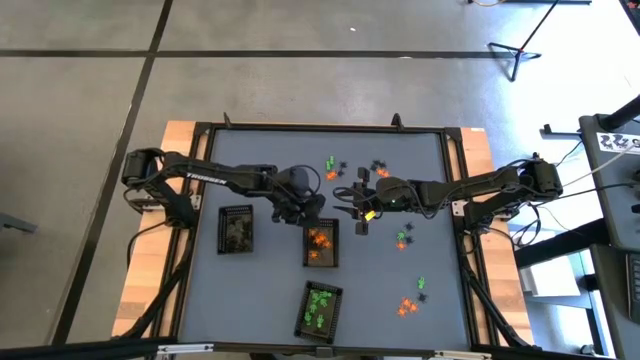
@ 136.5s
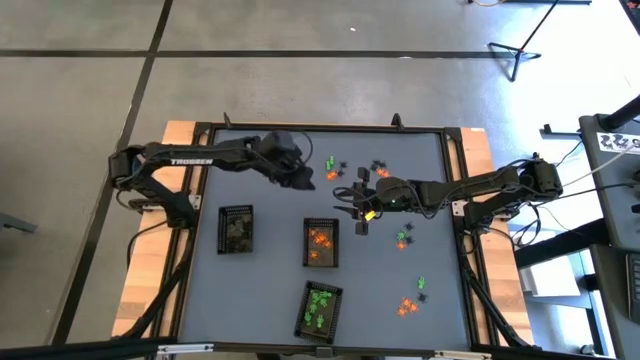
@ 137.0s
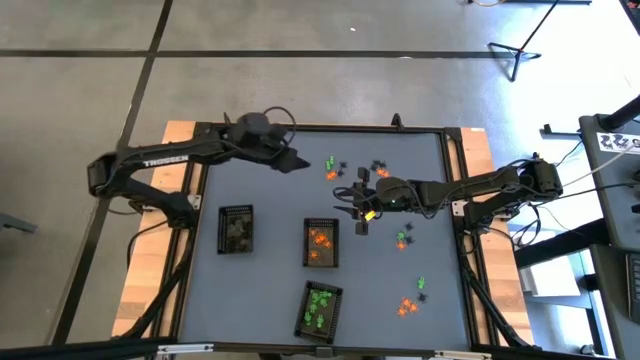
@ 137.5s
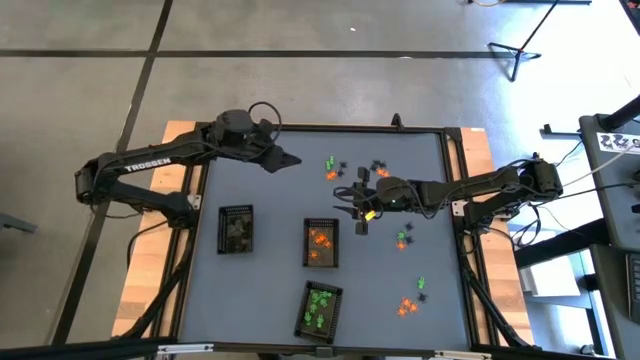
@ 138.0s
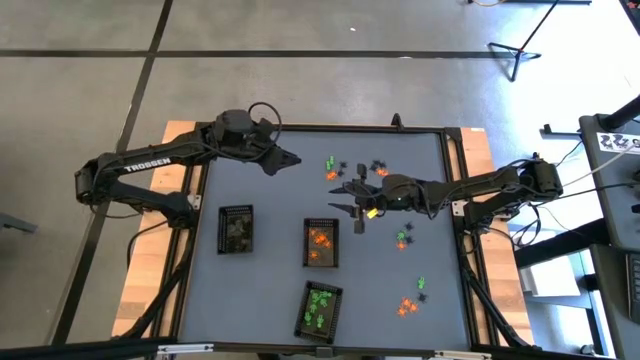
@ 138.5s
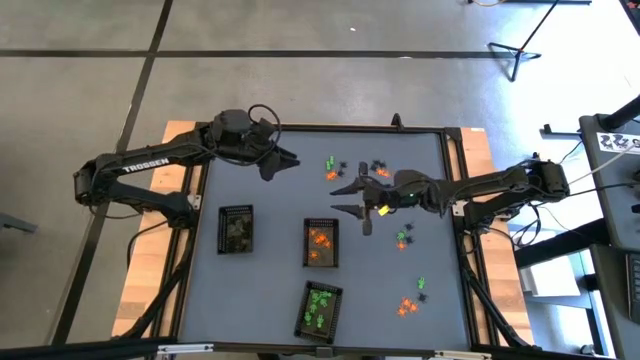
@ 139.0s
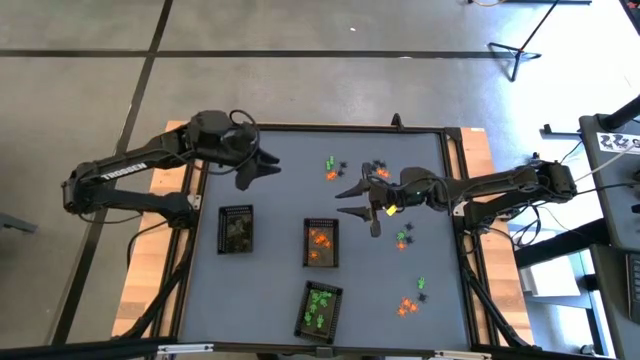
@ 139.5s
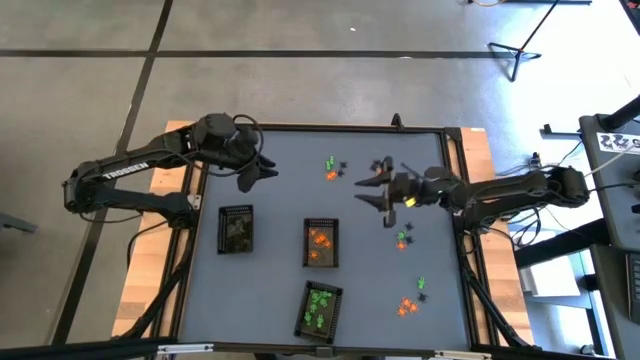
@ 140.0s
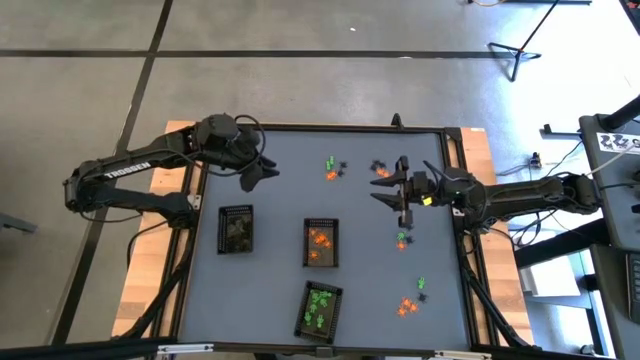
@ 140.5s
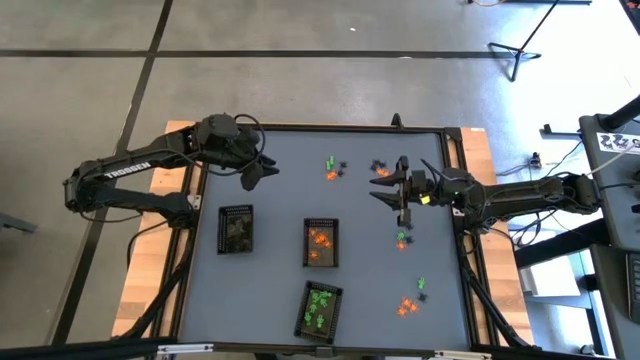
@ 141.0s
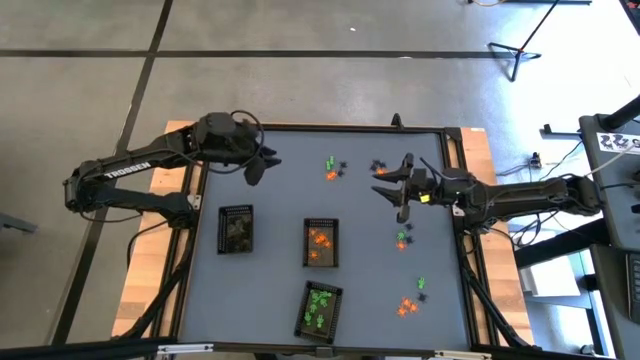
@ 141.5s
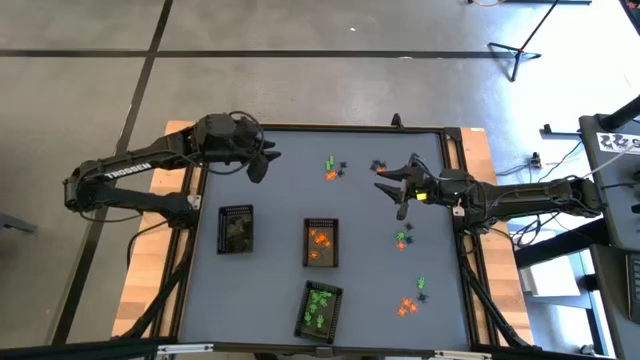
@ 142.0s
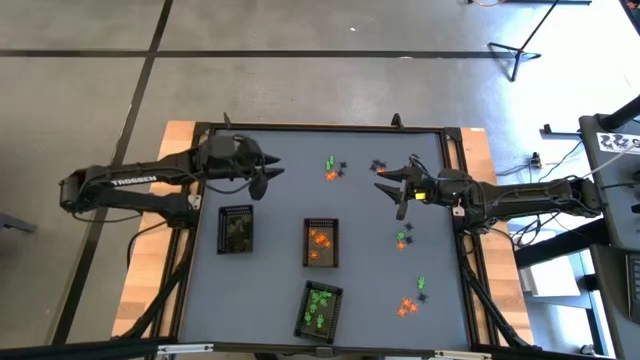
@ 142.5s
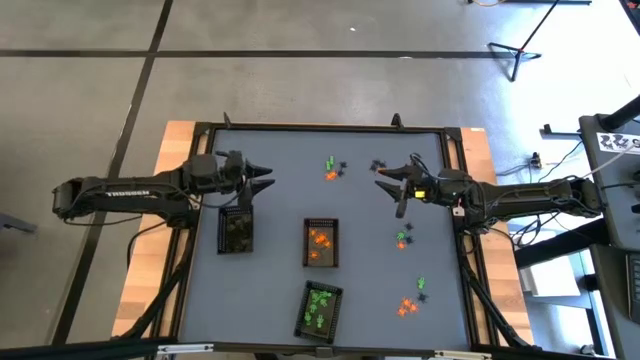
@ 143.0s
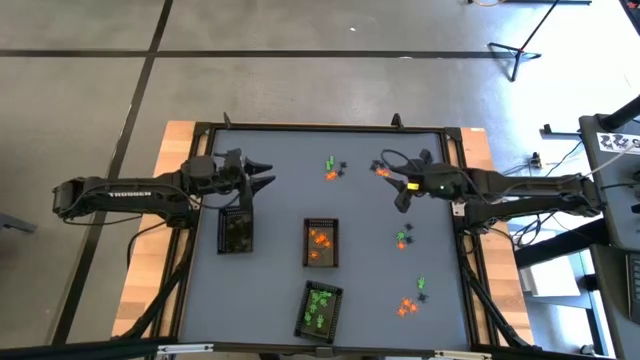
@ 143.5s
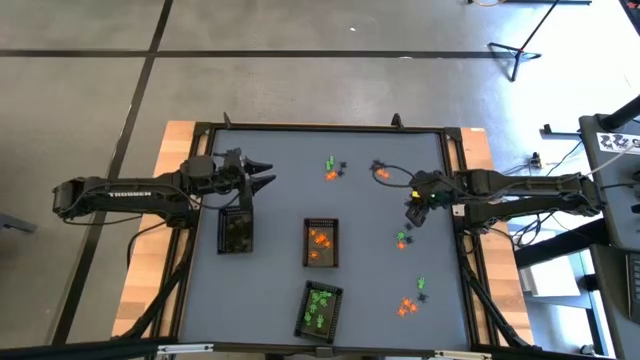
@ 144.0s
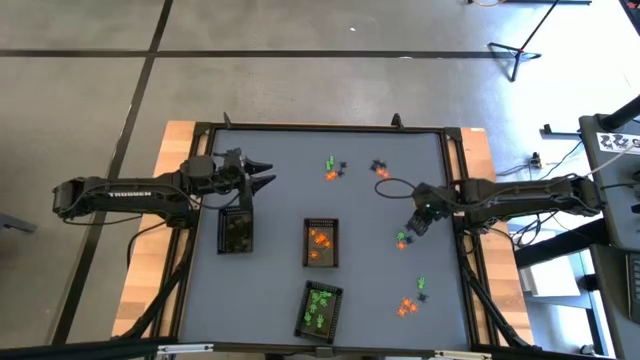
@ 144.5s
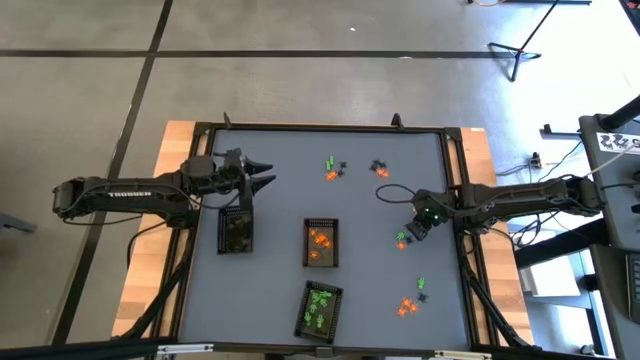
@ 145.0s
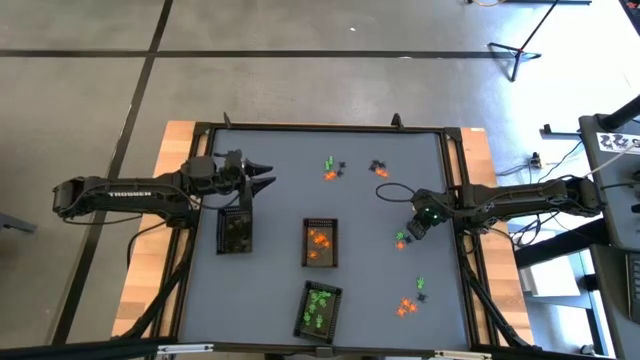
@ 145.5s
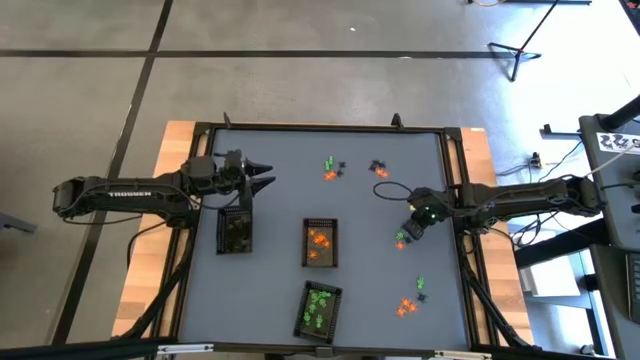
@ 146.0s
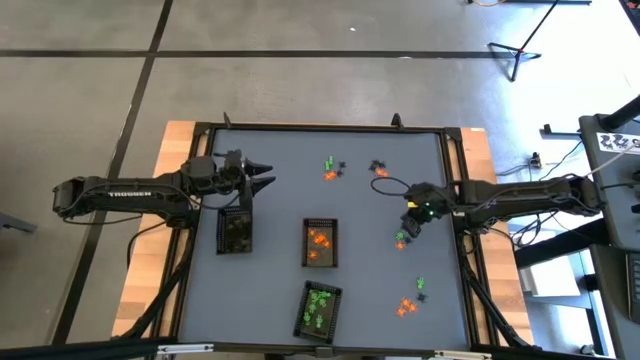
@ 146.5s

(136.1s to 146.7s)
Task: Sort Halloween decoration
Put the black spider toy into the top left black basket

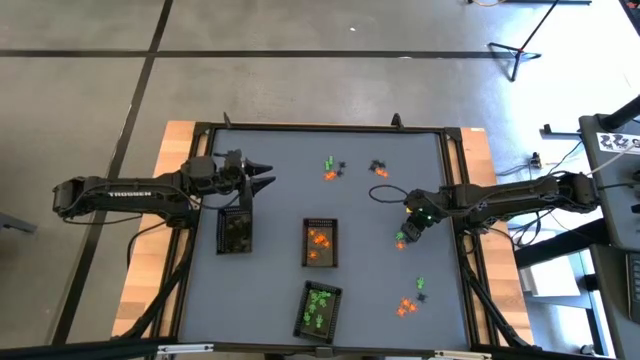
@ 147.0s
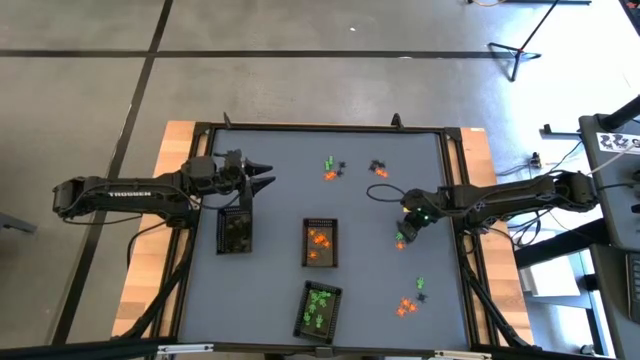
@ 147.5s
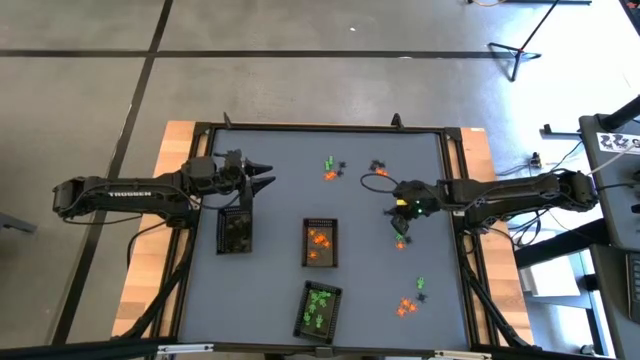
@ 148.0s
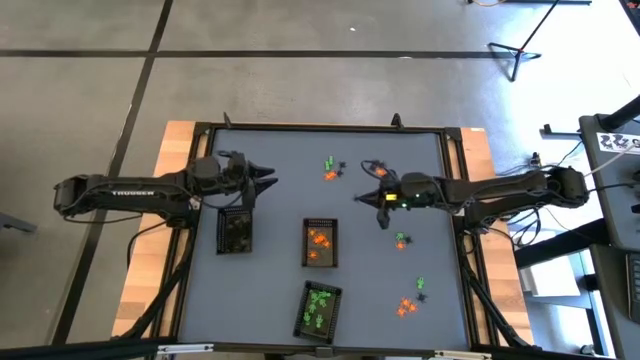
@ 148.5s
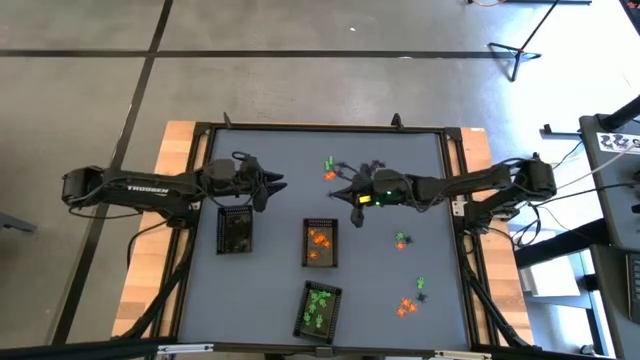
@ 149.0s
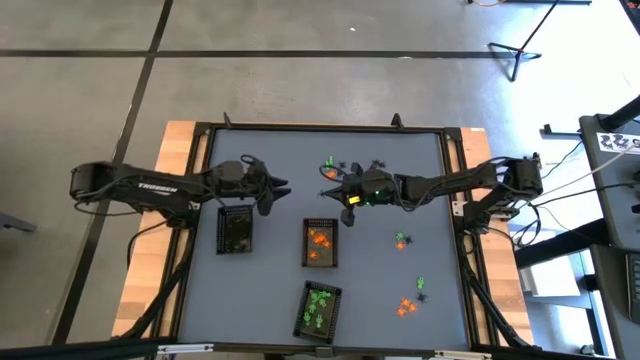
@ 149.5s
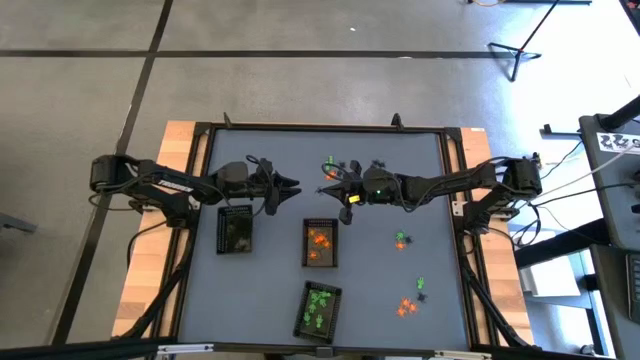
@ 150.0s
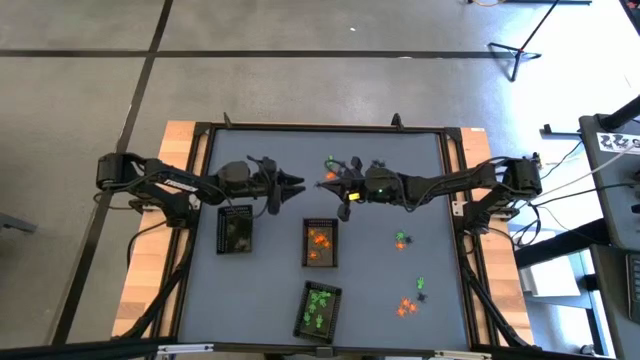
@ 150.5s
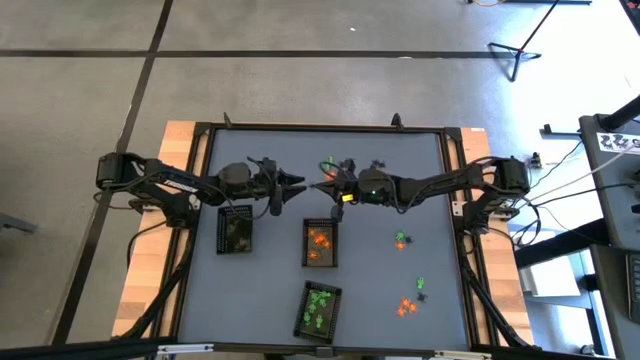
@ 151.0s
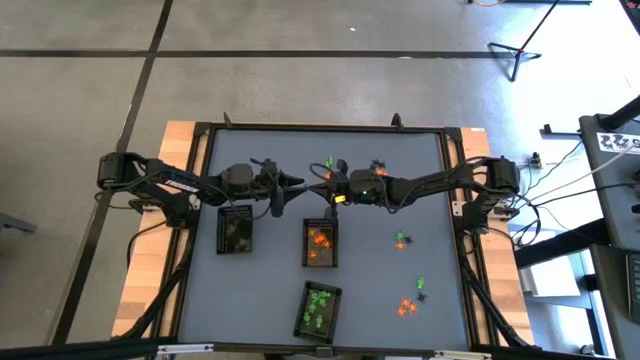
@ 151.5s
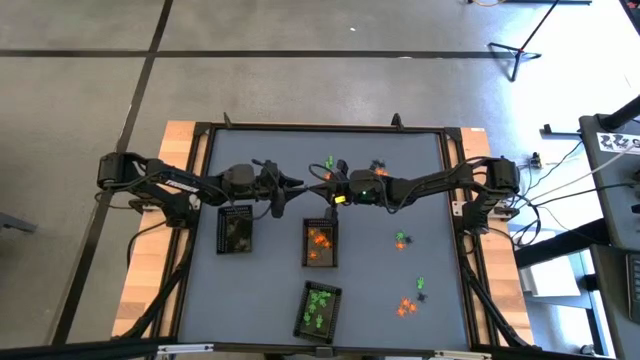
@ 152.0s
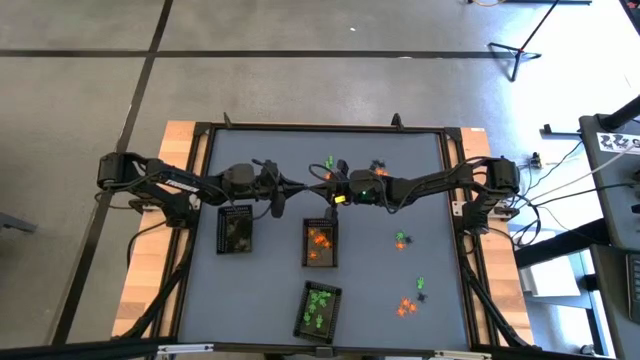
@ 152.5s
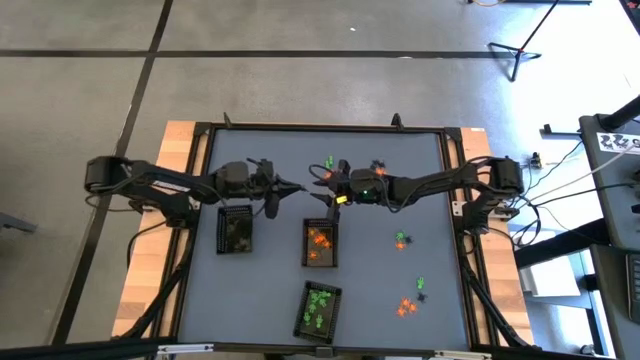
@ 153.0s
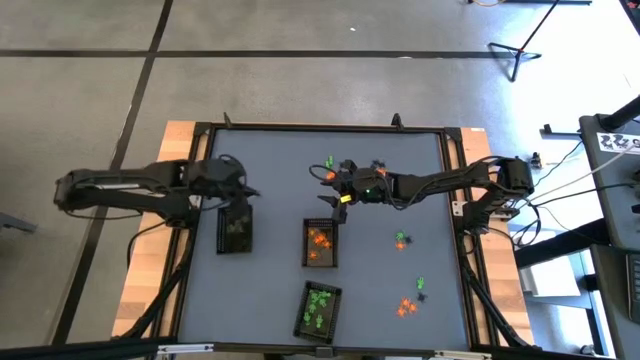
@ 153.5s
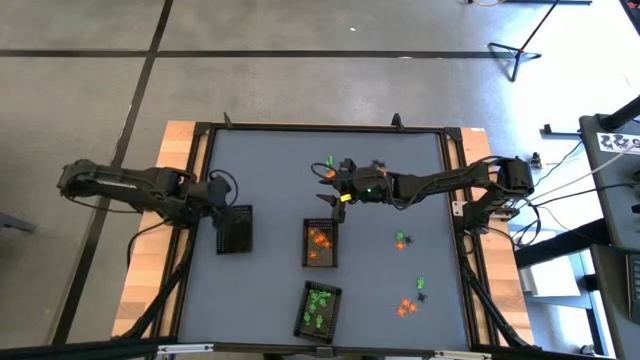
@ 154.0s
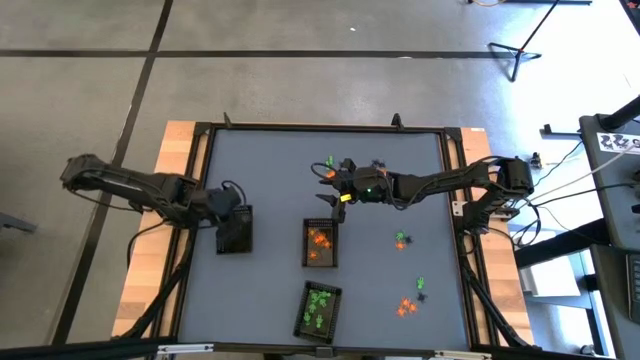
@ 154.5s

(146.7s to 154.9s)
Put the black spider toy into the top left black basket

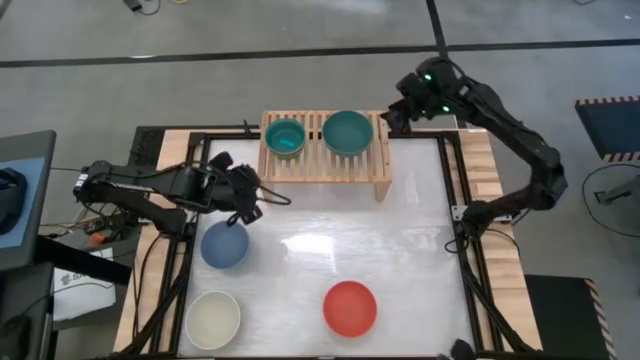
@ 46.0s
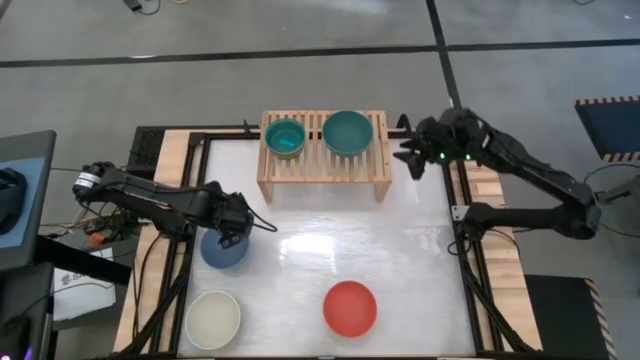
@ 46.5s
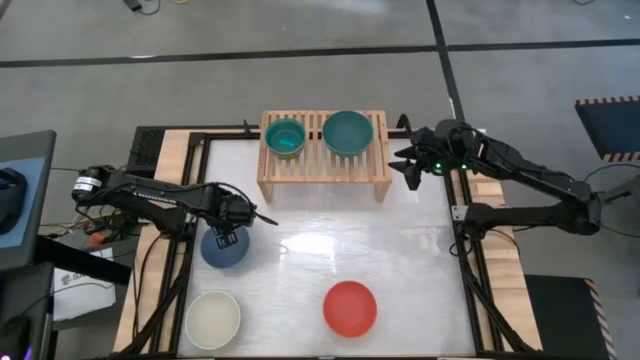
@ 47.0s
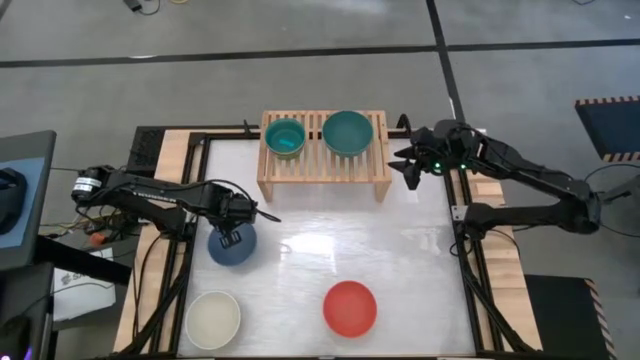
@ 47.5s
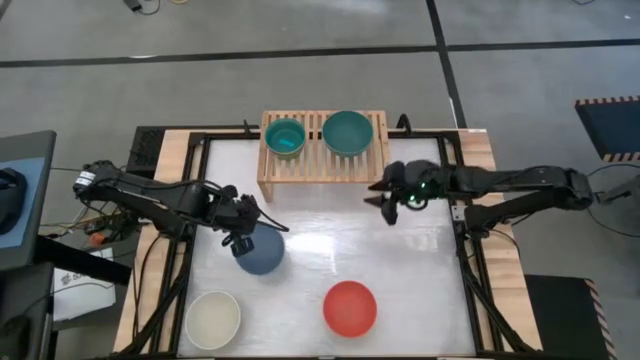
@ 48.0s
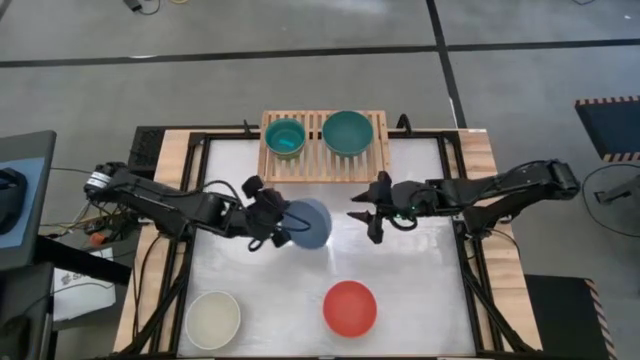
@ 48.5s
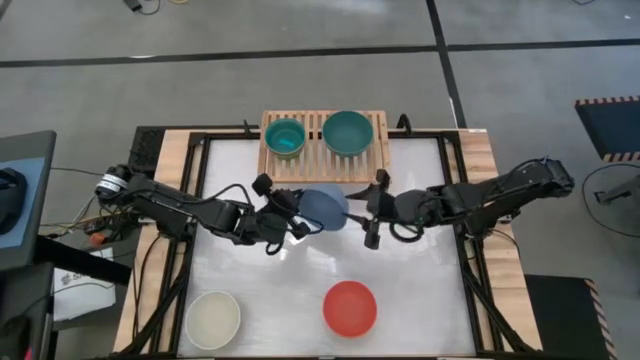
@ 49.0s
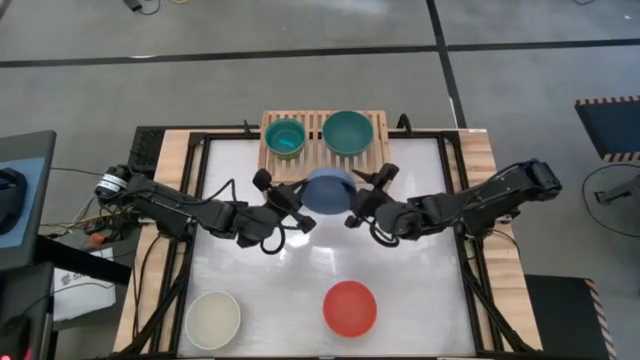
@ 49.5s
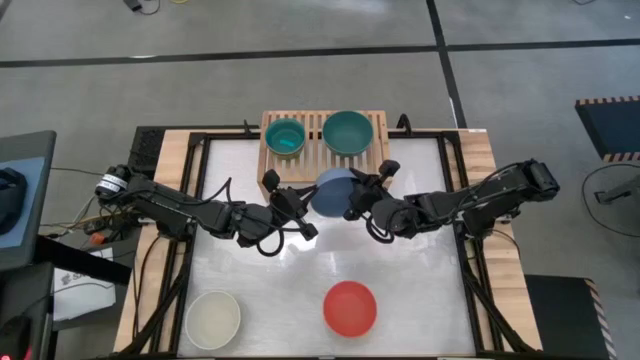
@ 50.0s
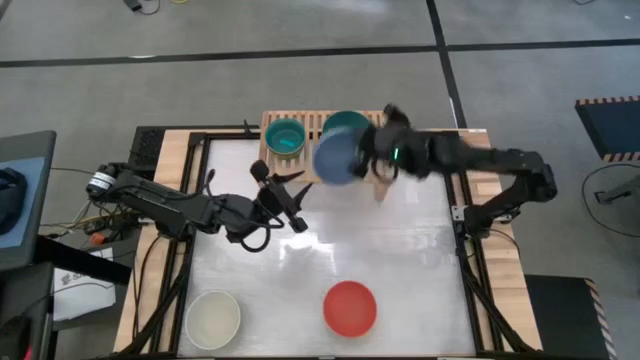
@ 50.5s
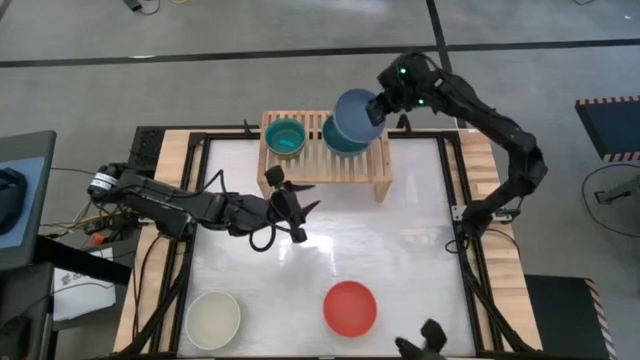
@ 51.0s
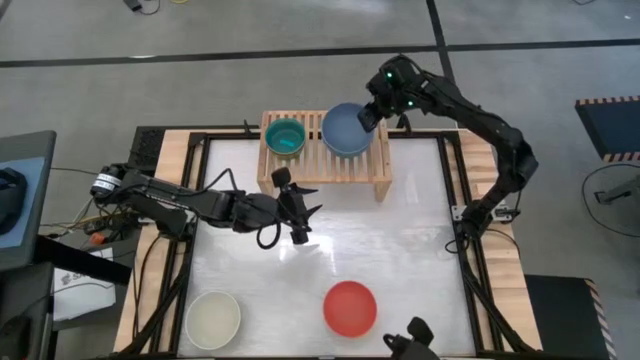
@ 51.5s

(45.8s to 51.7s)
Task: Place and stack bowls onto a shelf
Stack the blue bowl on top of the green bowl
